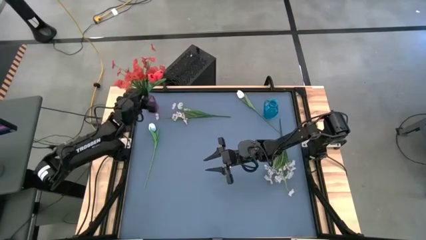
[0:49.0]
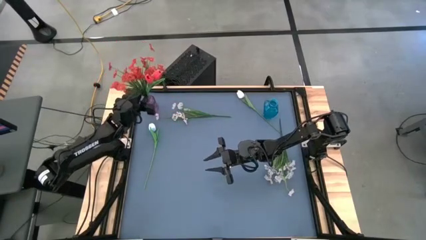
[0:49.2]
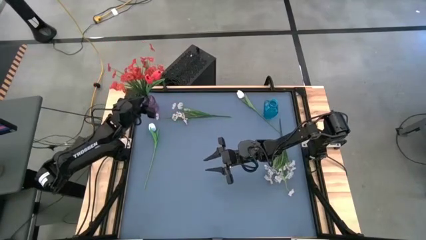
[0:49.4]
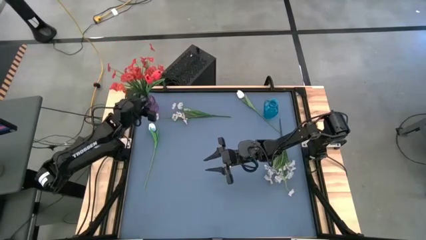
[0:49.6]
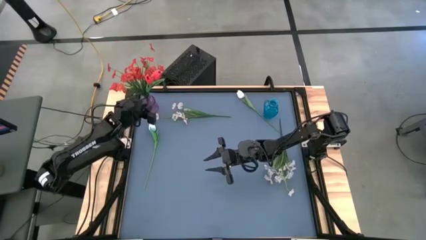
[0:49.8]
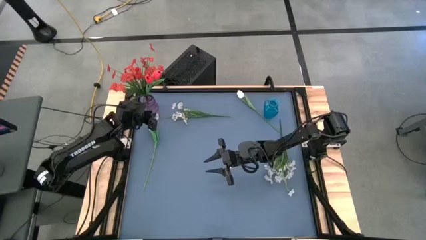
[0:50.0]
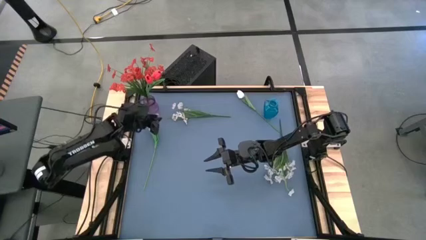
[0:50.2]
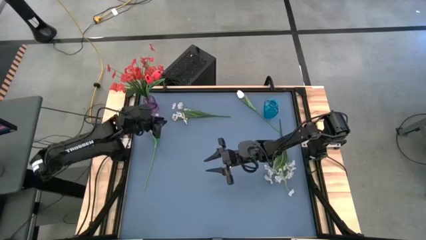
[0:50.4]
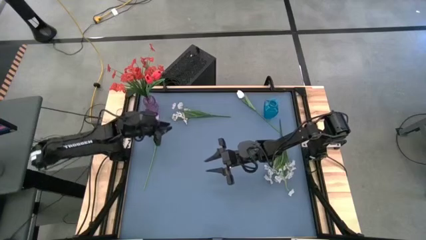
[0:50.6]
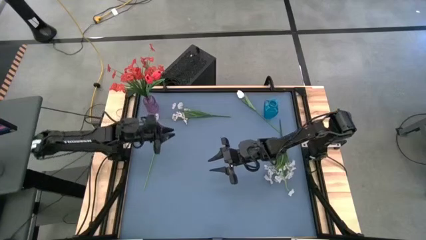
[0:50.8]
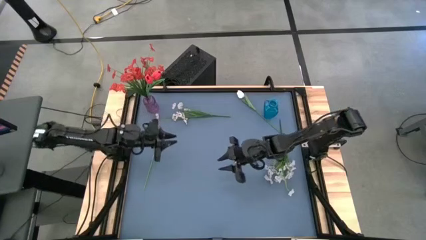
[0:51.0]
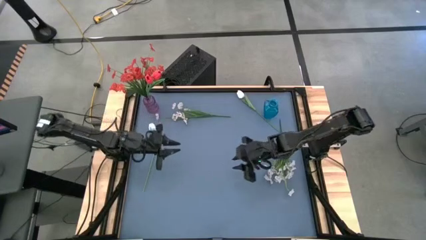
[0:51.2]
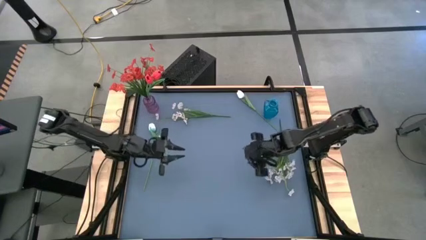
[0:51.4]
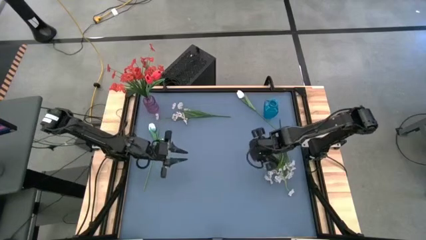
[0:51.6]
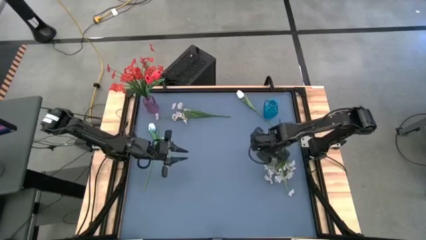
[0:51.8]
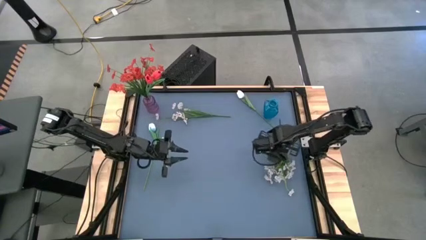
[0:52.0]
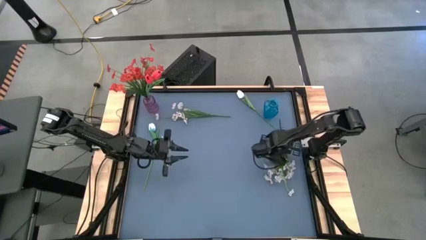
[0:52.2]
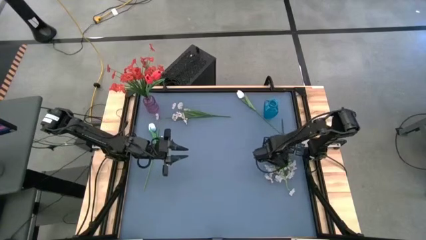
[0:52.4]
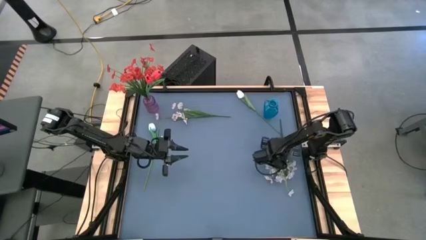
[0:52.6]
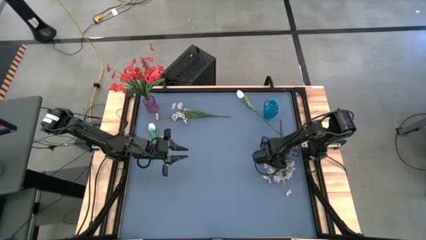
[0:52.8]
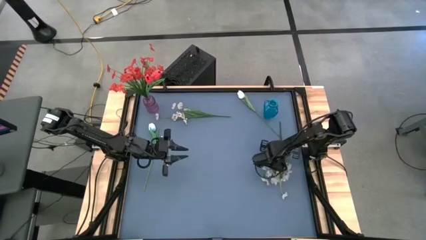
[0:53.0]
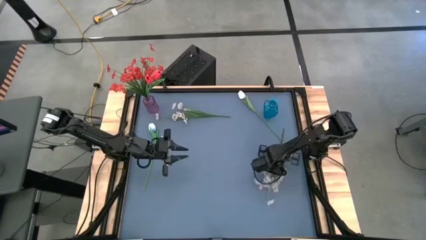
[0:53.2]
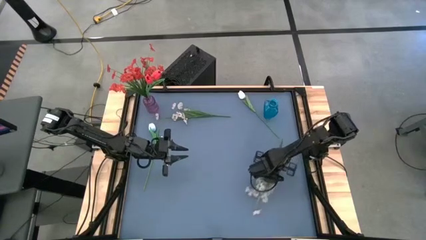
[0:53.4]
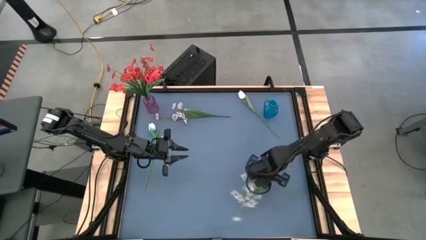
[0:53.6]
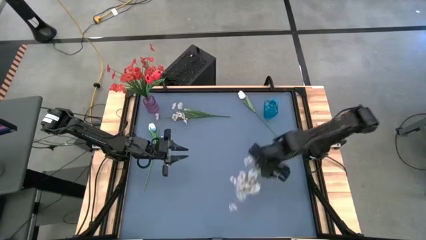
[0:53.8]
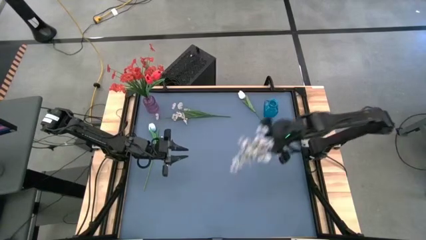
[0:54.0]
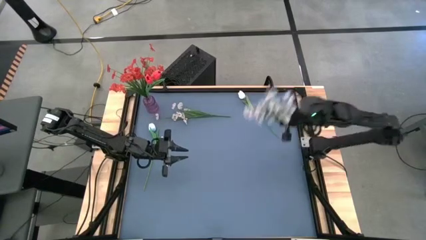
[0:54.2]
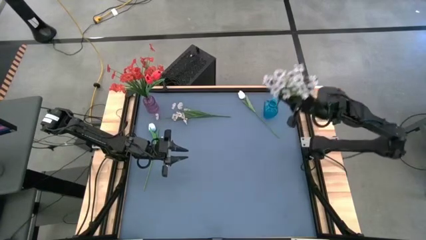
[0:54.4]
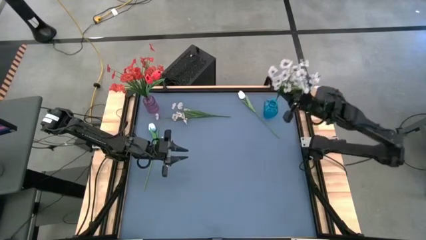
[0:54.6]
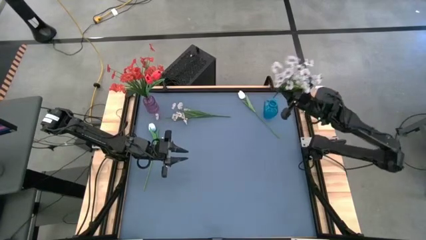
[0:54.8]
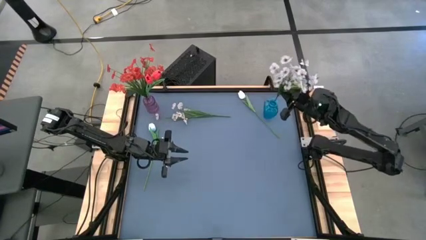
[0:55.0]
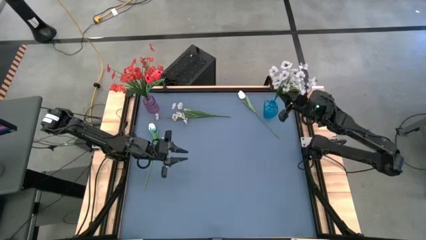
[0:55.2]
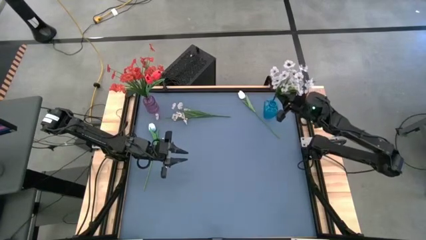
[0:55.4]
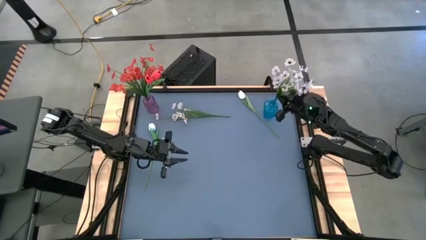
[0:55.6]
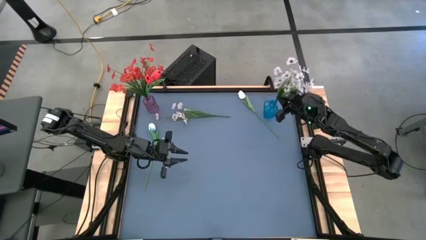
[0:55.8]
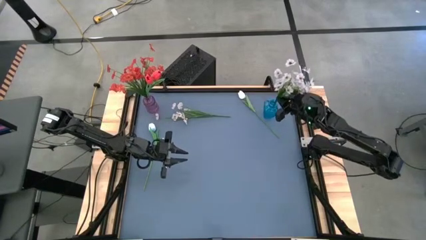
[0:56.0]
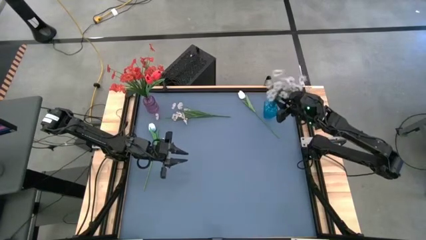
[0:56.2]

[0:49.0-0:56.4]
Task: Sort flowers into vase by color
Put the bottom white flowers into the blue vase

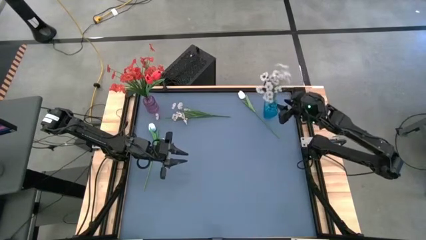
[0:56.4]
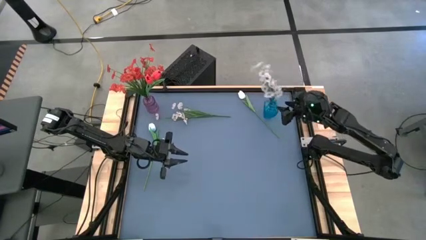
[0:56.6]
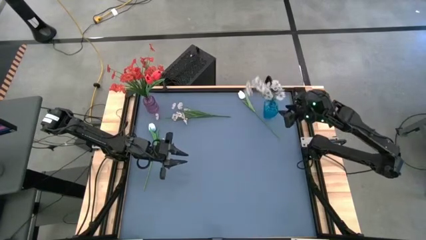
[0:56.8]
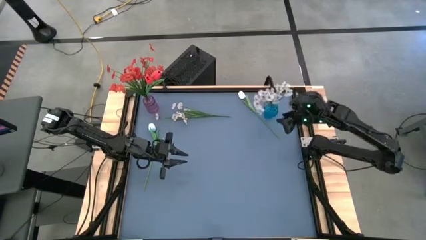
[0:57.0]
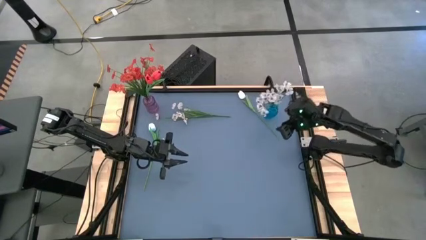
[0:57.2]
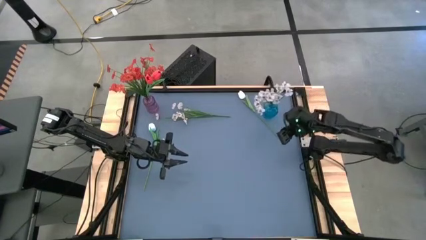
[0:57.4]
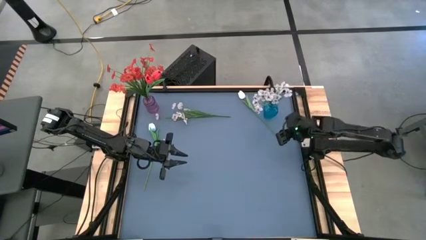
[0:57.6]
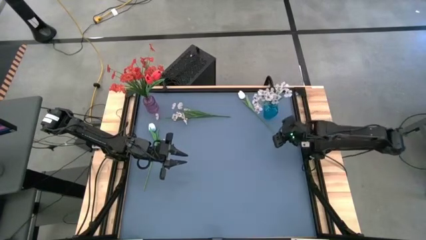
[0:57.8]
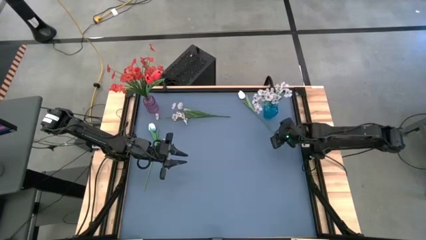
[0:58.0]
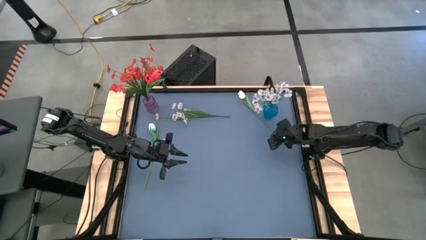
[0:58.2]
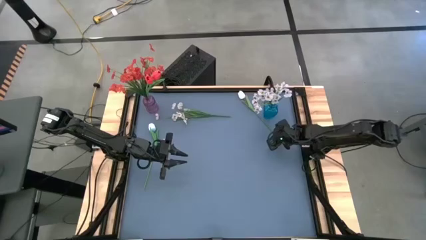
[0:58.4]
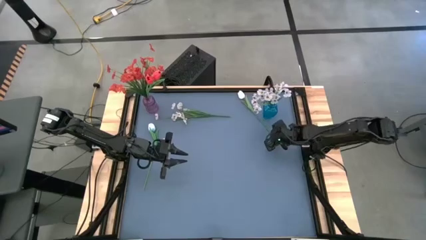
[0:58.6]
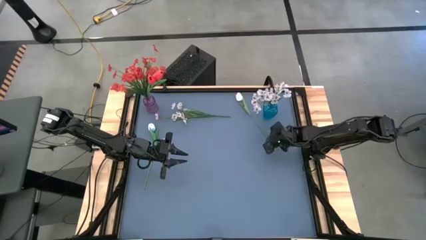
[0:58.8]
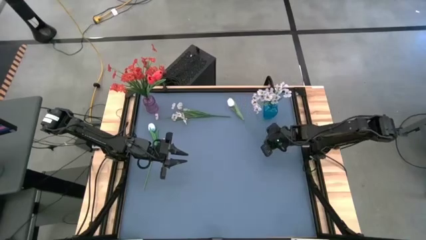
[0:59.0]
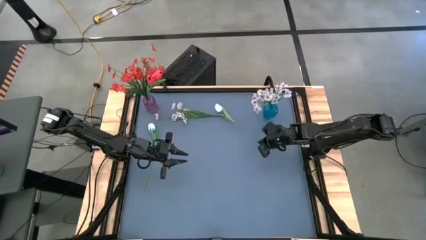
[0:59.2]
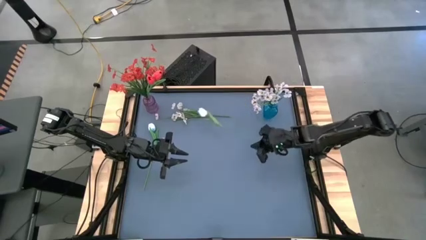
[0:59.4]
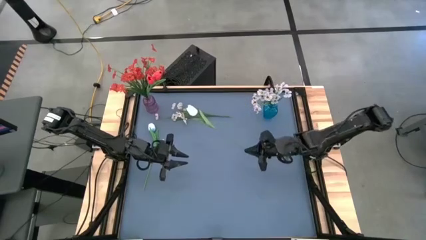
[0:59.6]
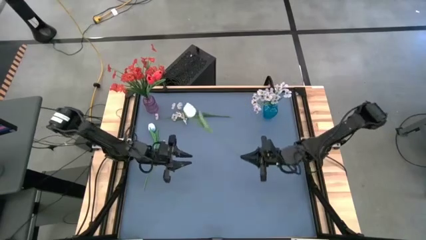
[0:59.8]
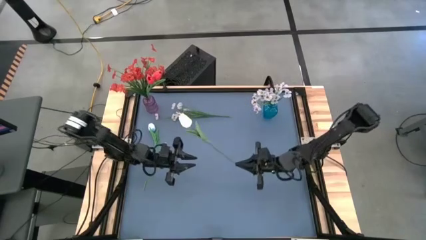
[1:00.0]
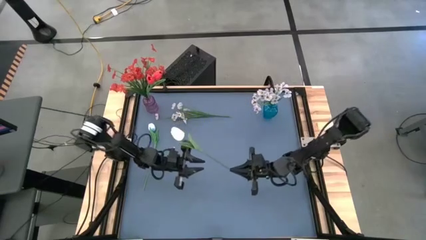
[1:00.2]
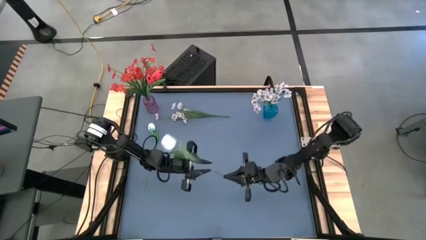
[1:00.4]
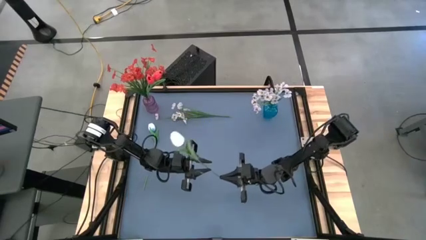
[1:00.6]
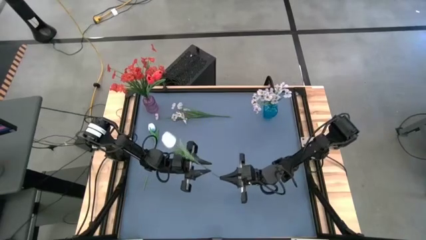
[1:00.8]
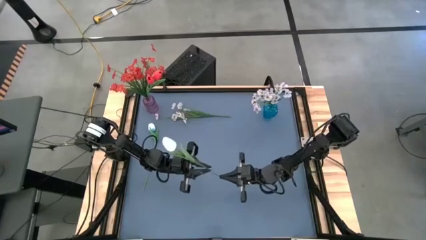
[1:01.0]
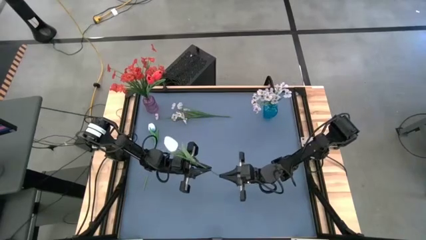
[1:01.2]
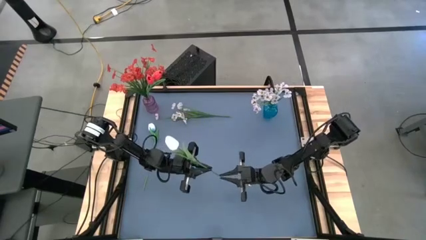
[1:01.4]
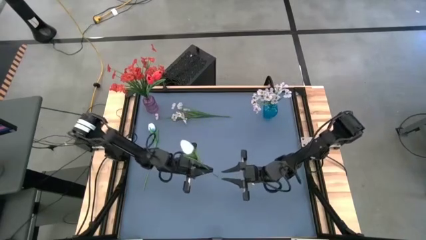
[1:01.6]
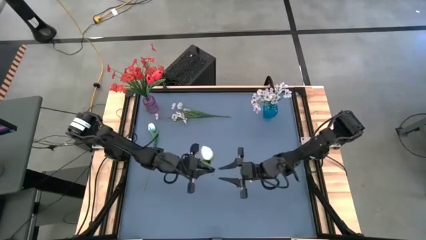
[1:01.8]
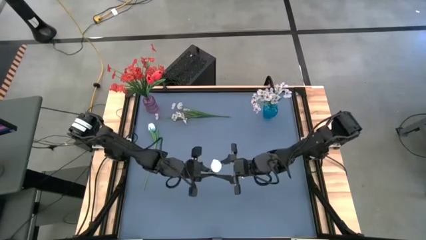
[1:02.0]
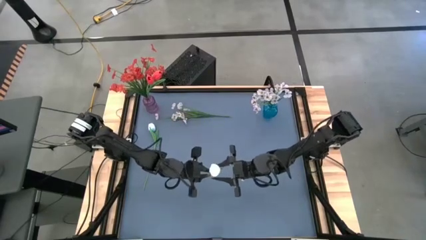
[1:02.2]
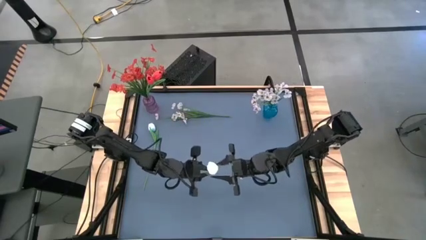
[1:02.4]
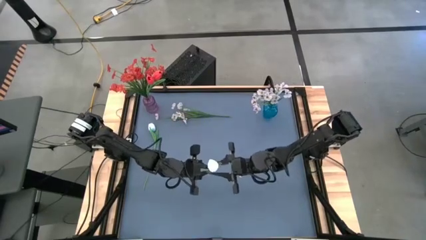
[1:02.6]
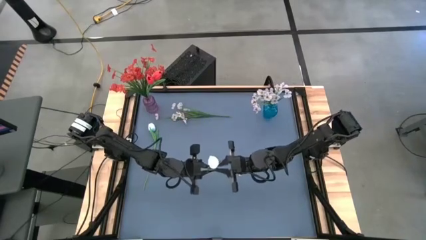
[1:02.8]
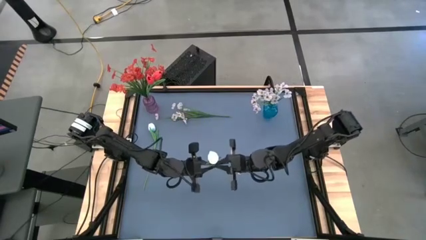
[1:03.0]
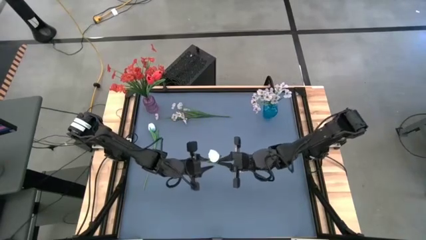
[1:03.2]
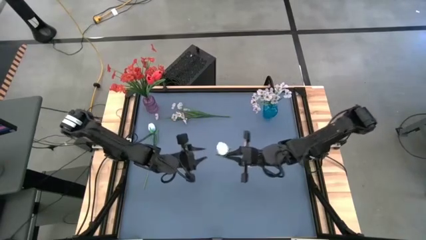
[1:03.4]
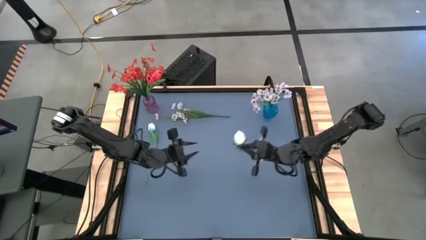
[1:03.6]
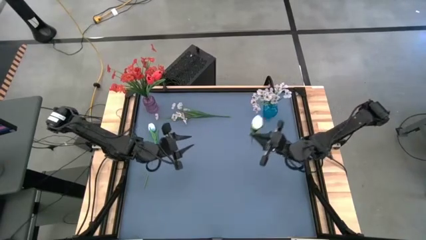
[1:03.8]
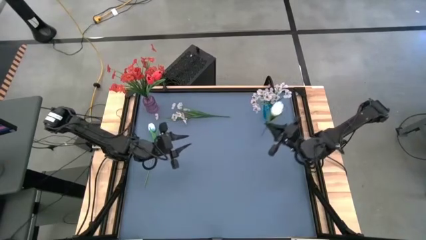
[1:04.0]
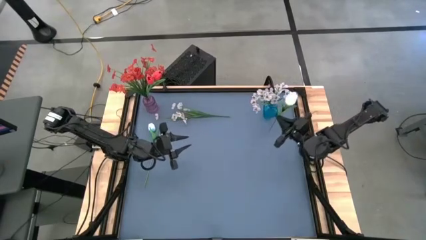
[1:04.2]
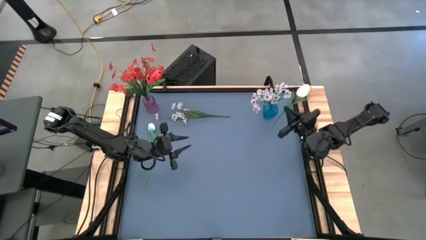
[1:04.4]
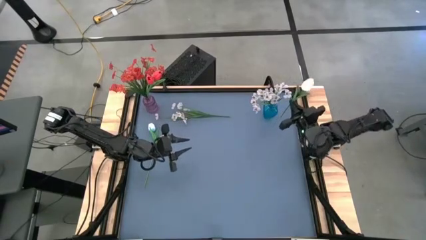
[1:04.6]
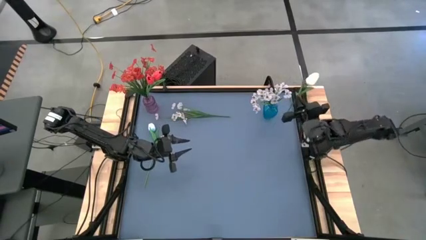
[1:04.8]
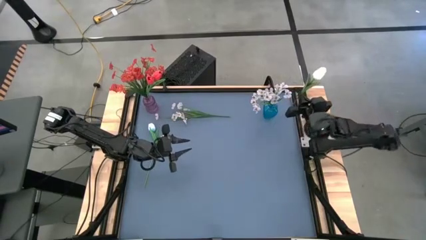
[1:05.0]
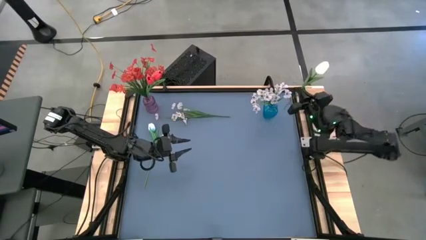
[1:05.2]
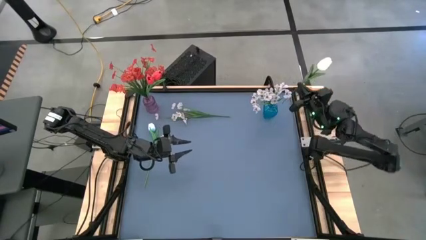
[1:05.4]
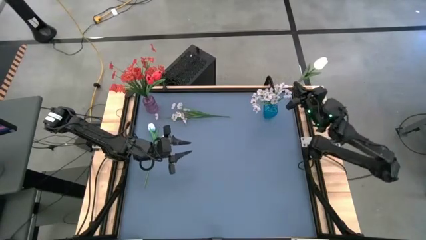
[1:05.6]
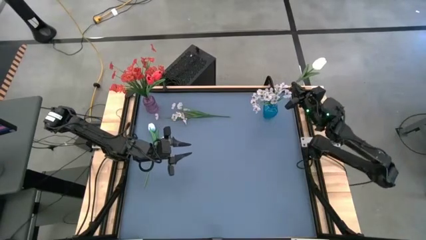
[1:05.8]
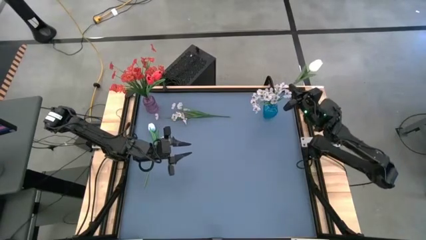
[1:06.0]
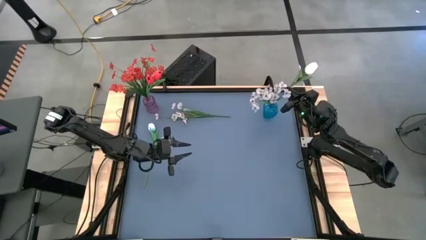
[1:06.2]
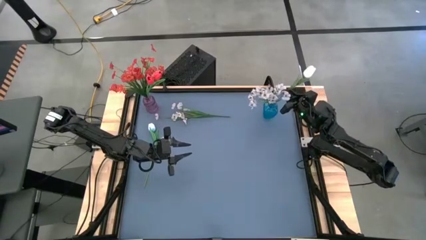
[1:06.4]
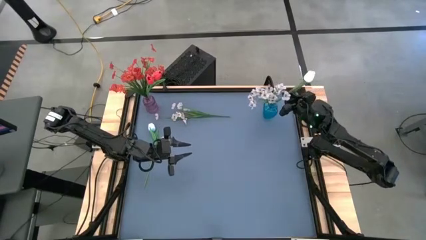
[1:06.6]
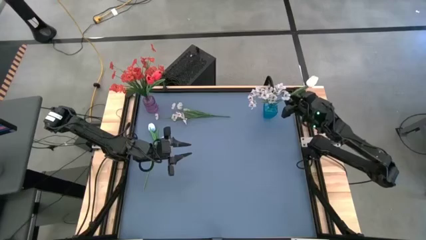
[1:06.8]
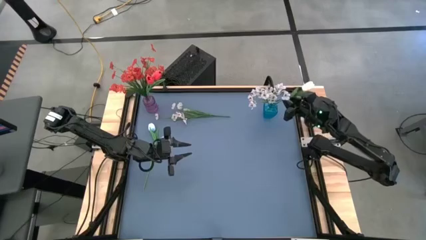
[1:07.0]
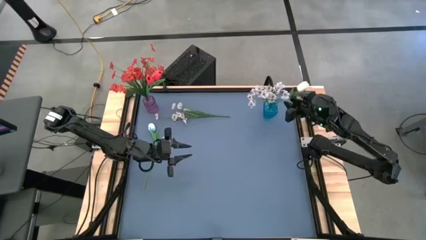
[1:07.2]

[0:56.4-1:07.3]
Put the right white flower into the blue vase
